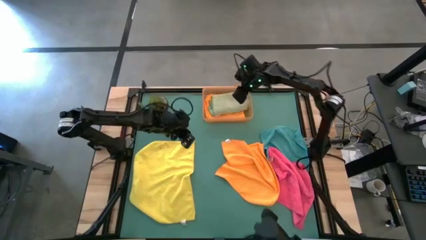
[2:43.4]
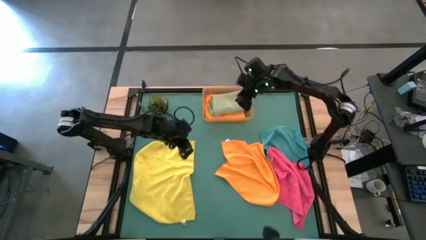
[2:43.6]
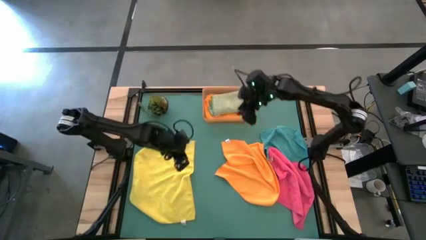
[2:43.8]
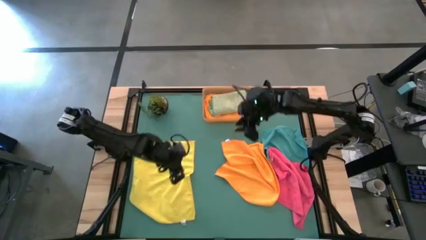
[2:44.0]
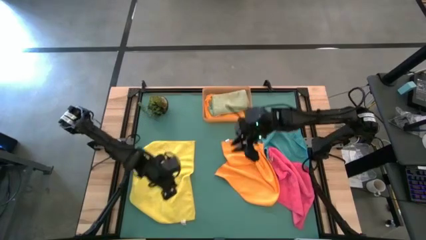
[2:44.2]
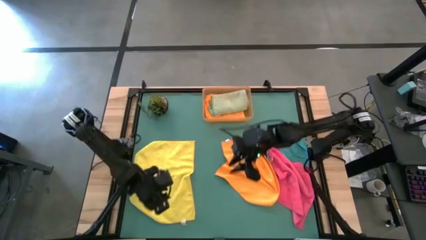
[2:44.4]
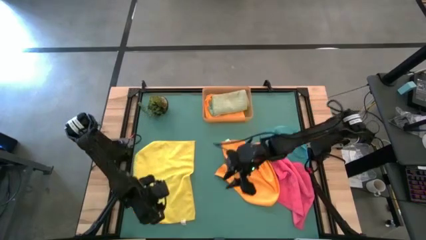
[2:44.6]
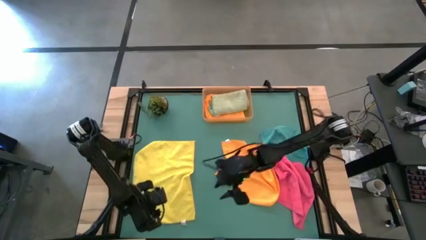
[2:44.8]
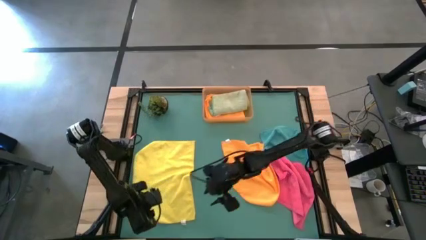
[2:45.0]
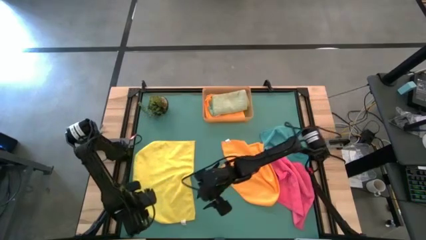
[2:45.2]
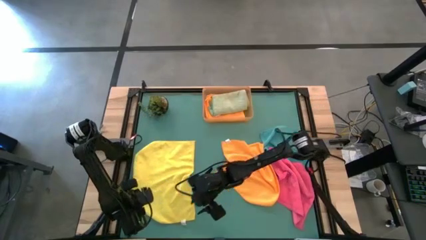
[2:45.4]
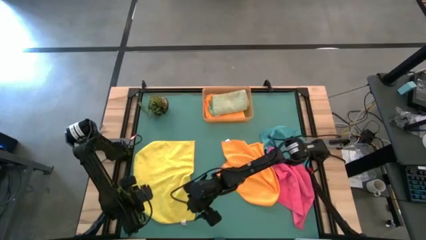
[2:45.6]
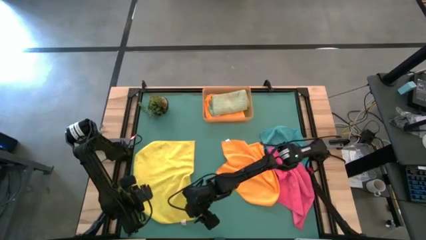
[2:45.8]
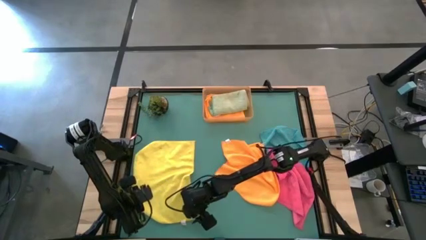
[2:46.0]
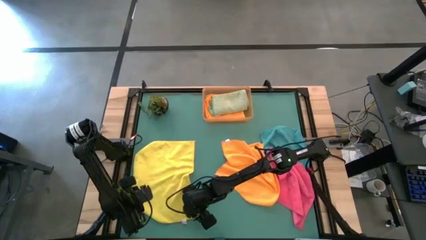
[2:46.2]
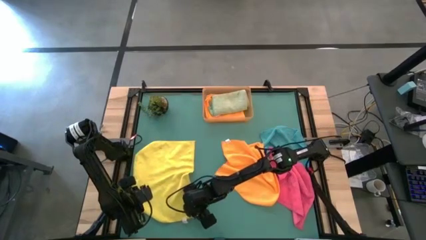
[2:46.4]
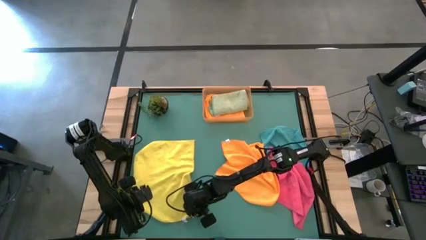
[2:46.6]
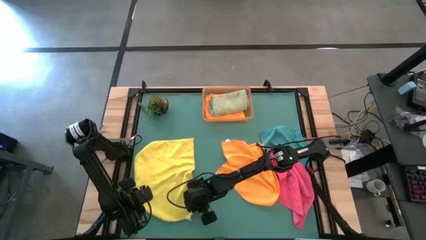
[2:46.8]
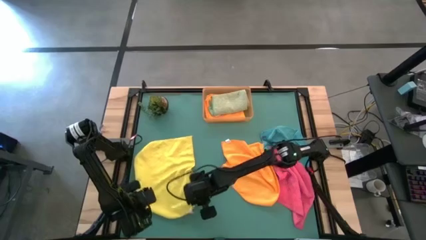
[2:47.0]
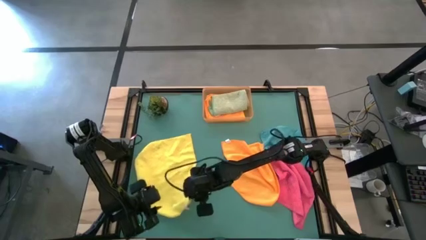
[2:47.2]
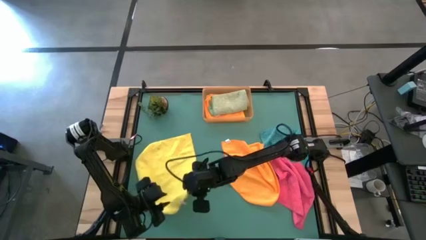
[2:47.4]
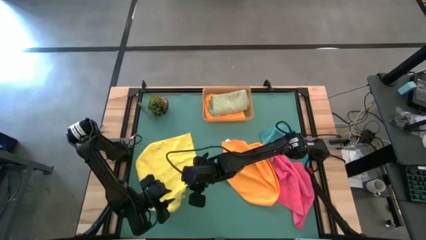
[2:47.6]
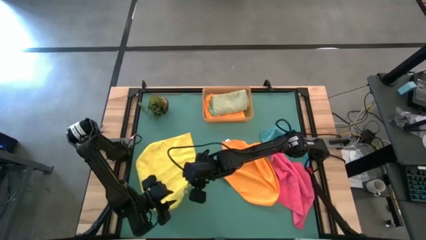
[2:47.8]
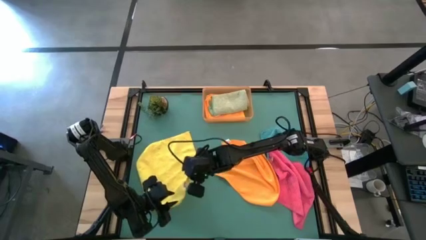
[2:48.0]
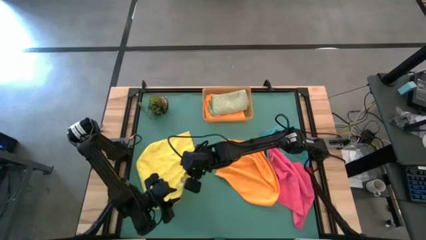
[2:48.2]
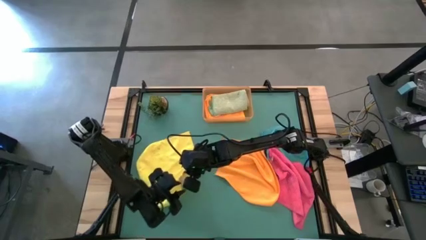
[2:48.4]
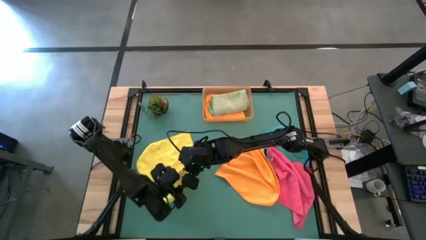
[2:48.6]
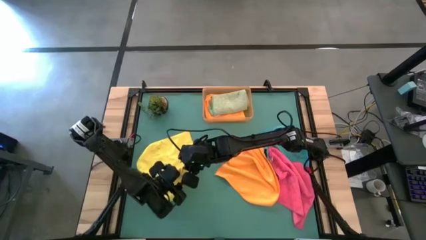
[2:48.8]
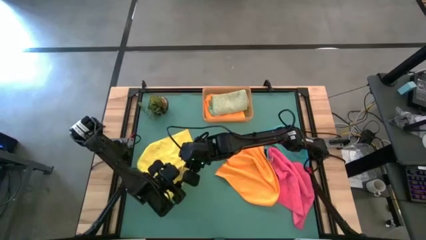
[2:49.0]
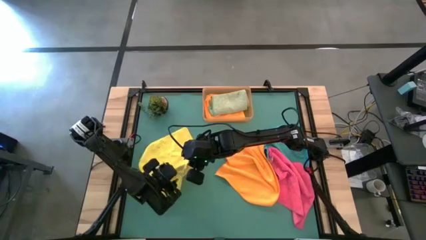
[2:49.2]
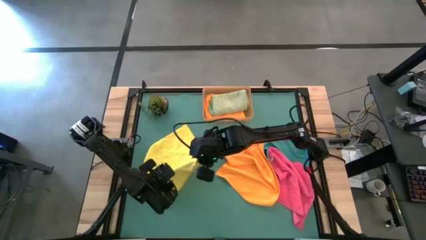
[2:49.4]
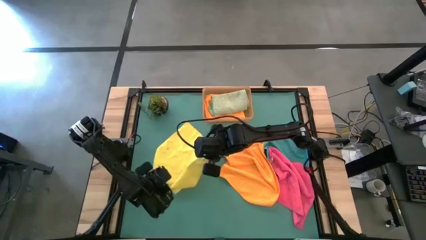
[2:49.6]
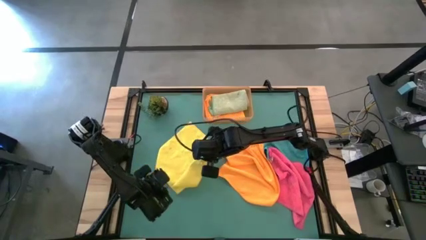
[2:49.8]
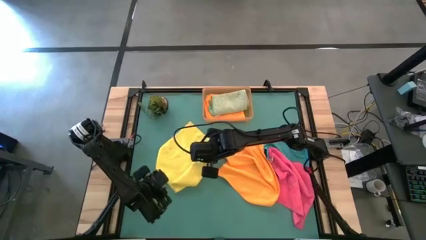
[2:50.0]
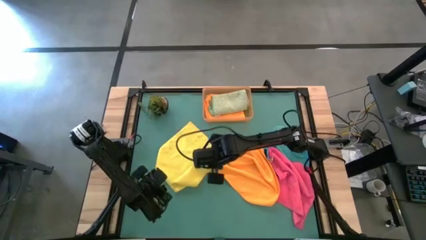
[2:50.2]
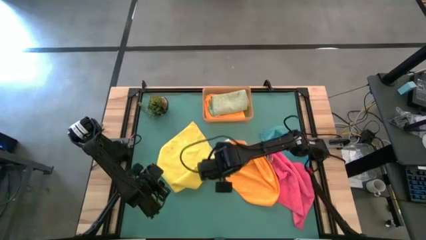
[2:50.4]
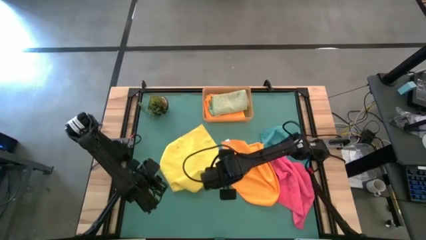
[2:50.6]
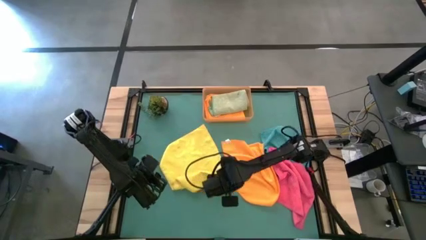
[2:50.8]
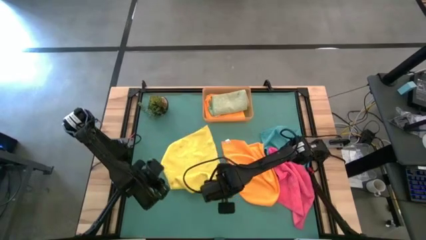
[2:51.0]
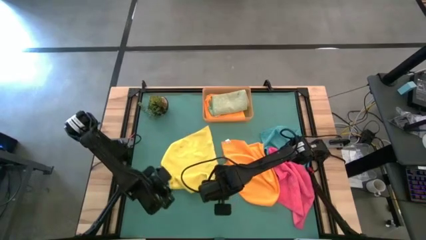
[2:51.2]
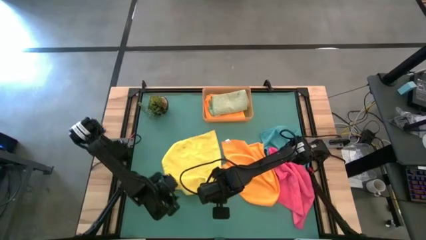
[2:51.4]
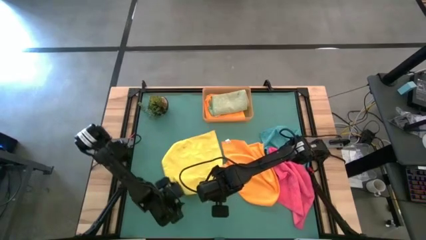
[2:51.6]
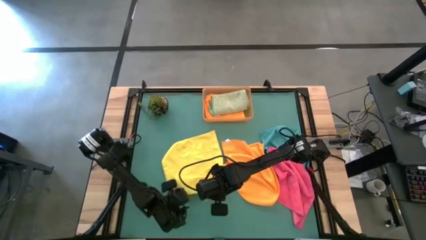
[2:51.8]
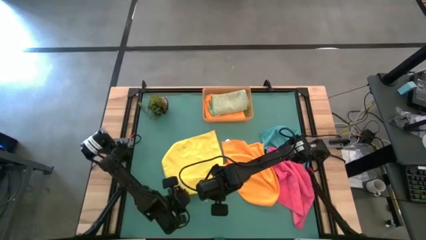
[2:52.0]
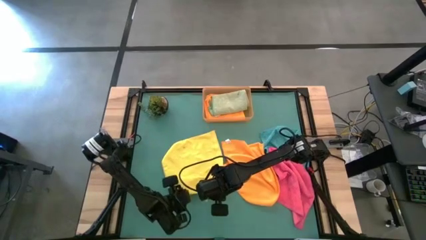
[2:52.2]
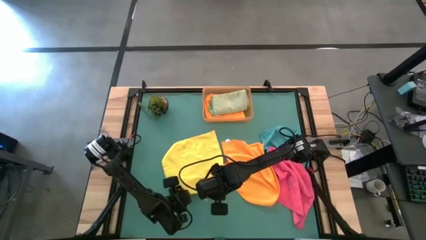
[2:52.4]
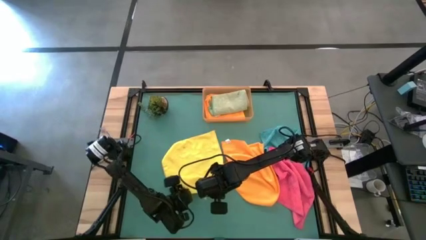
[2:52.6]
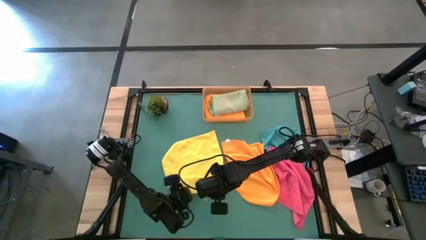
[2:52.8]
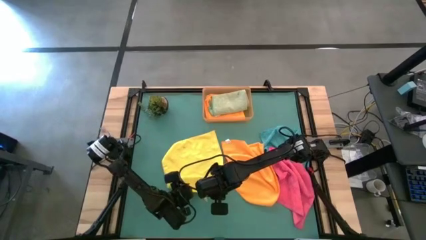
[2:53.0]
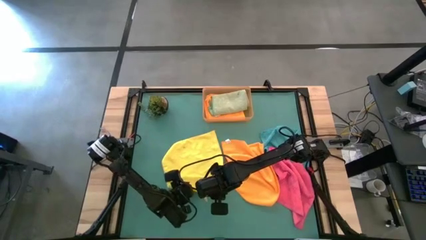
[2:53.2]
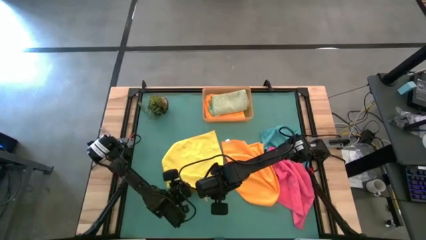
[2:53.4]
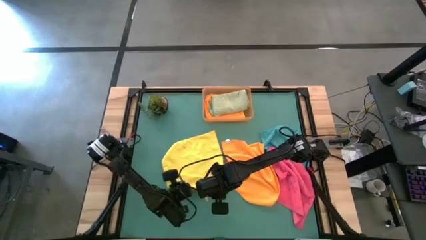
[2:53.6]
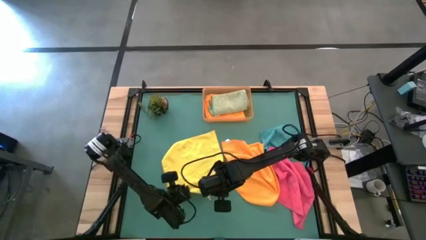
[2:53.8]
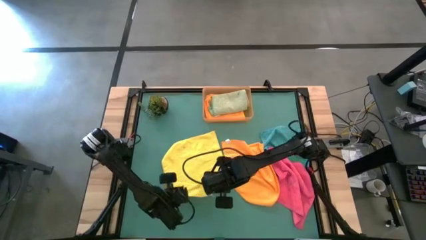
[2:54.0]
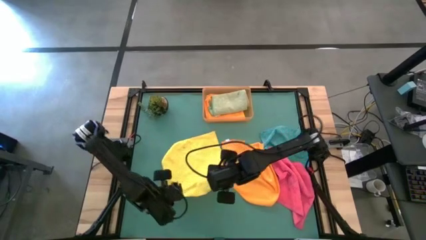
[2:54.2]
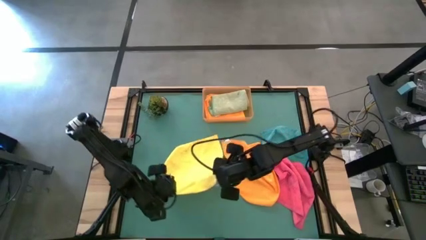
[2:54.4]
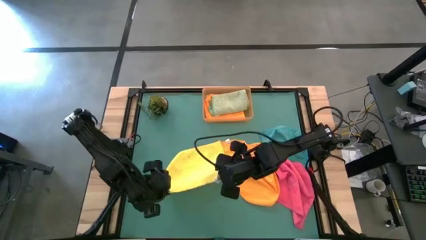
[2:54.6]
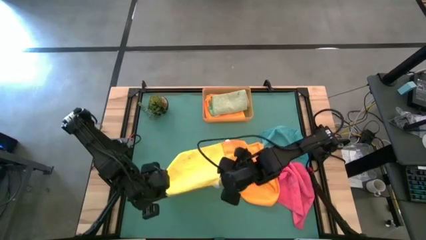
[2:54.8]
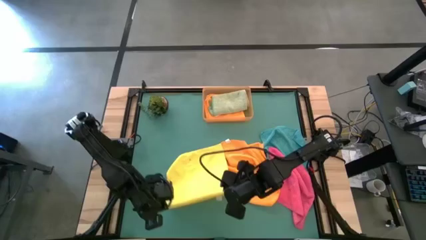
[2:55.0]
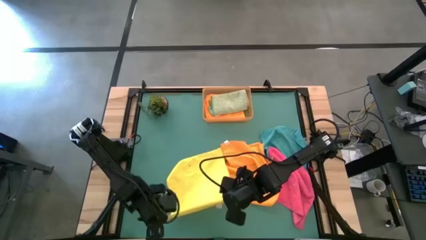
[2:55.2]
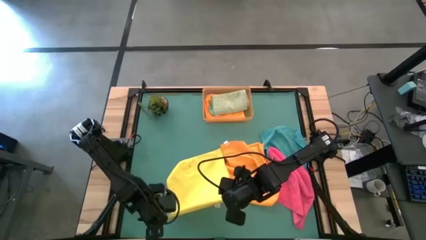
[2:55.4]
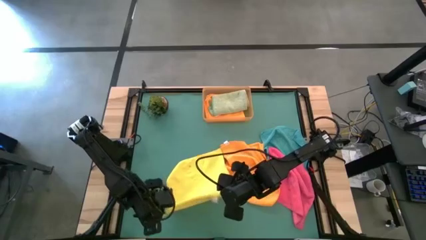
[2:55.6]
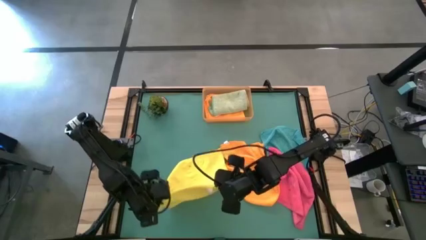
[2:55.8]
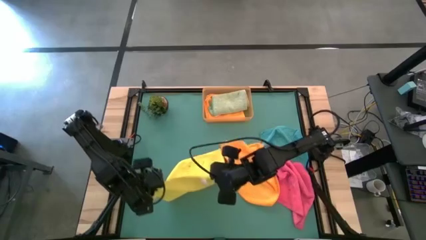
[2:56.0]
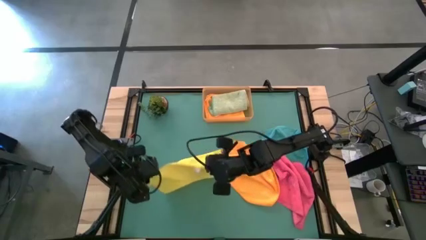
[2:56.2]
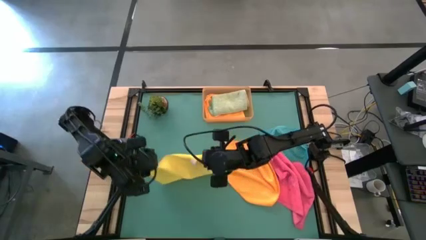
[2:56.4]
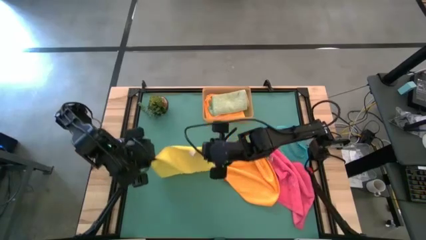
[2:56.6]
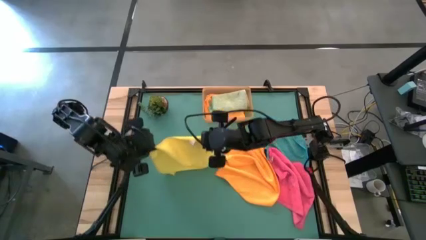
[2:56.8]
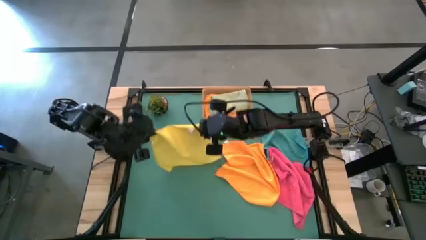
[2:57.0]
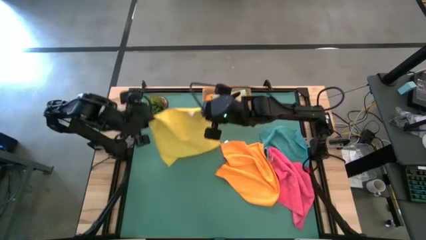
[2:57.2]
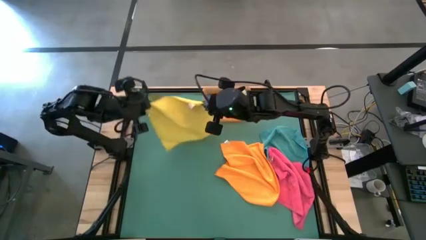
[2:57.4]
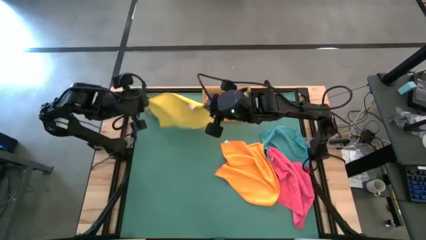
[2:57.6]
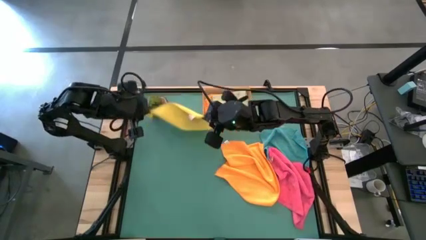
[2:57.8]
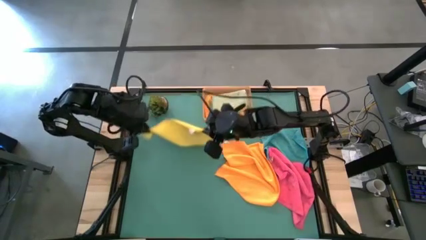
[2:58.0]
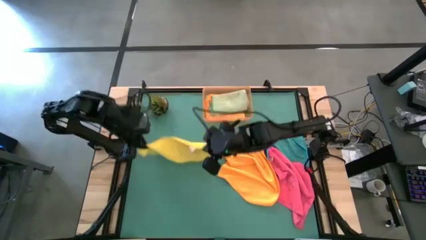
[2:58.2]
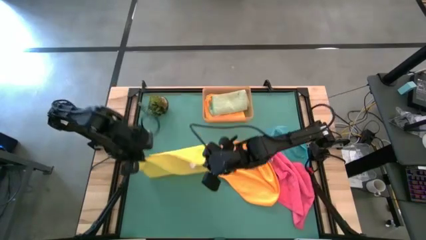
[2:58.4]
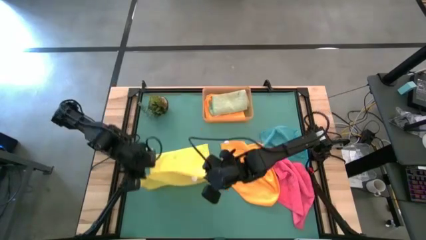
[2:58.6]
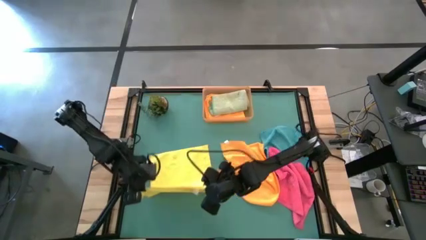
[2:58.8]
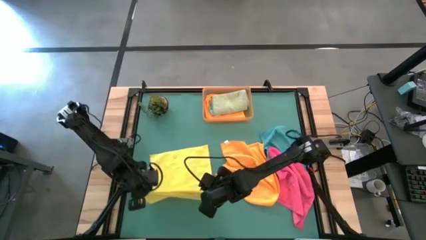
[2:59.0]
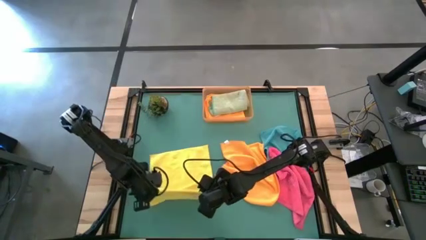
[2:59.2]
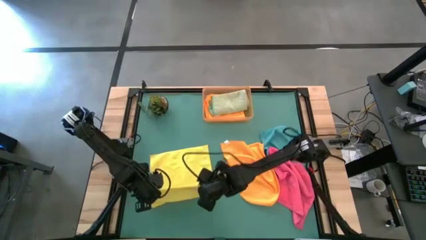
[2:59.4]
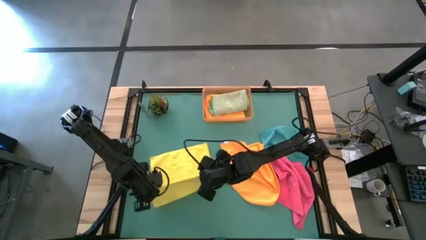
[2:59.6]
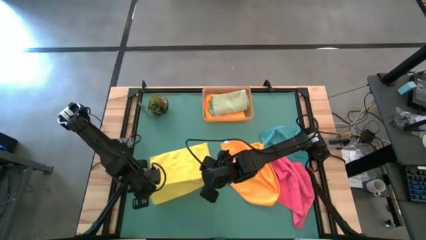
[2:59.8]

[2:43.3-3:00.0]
Task: Fold microfiber towels
Fold the yellow towel
